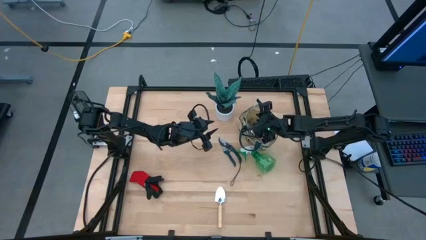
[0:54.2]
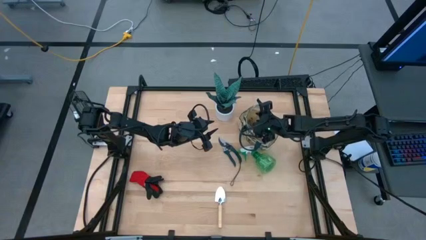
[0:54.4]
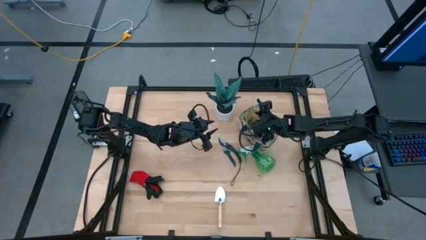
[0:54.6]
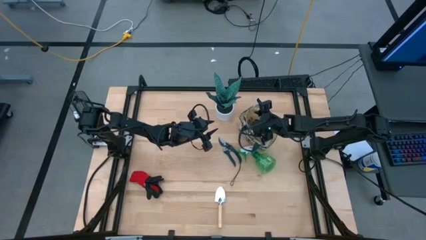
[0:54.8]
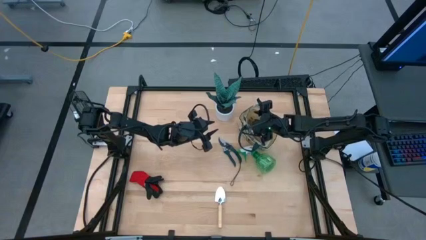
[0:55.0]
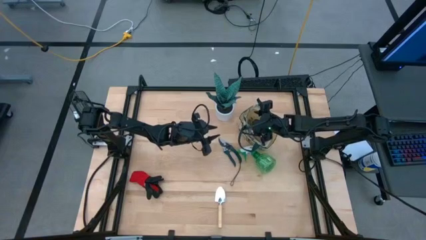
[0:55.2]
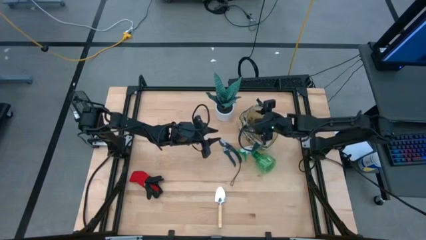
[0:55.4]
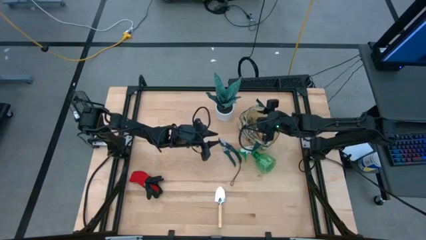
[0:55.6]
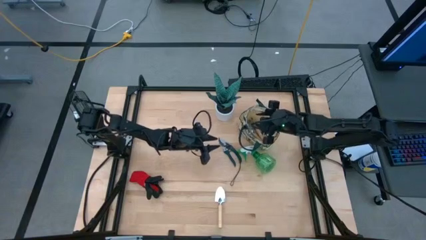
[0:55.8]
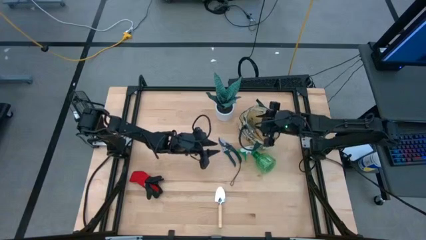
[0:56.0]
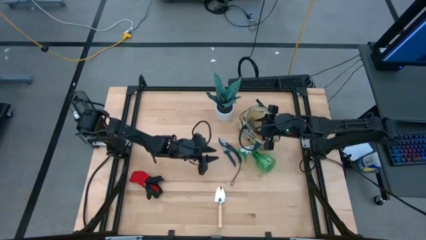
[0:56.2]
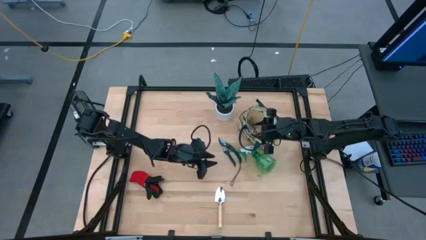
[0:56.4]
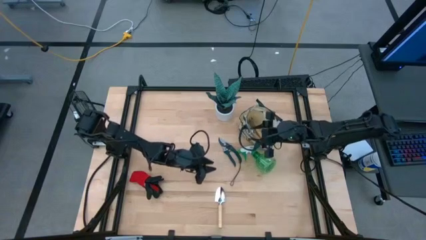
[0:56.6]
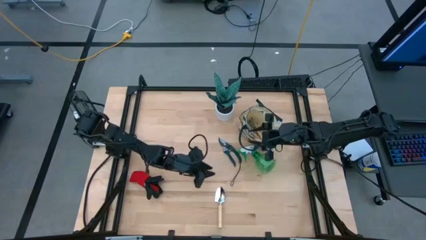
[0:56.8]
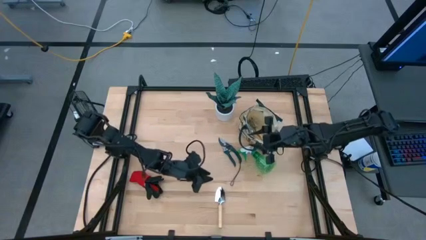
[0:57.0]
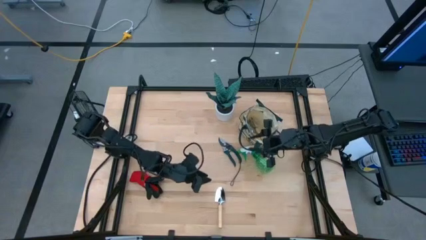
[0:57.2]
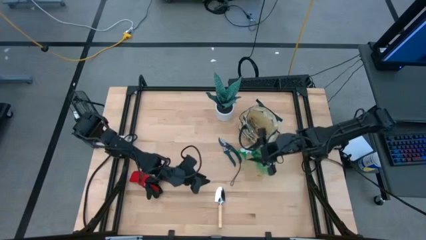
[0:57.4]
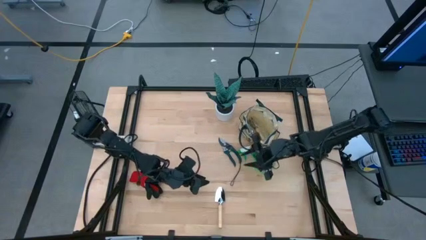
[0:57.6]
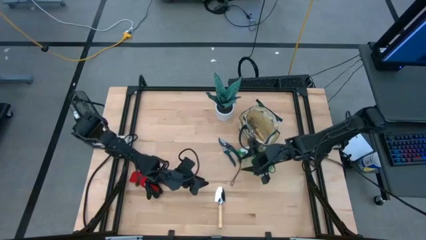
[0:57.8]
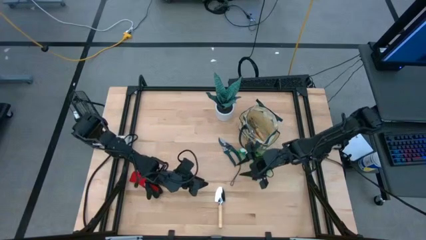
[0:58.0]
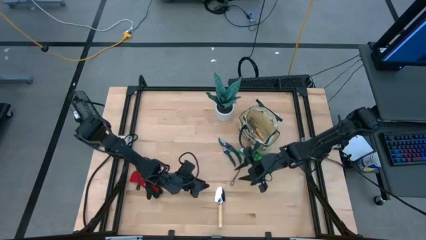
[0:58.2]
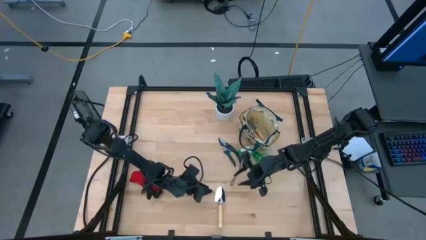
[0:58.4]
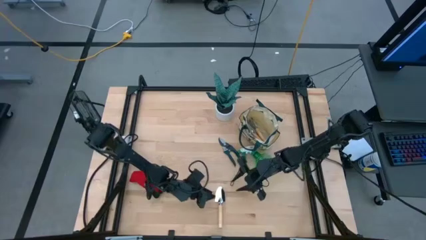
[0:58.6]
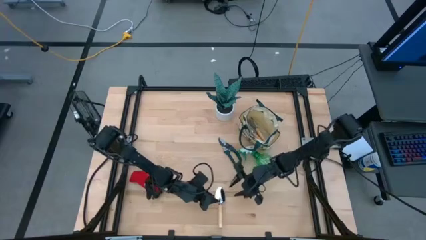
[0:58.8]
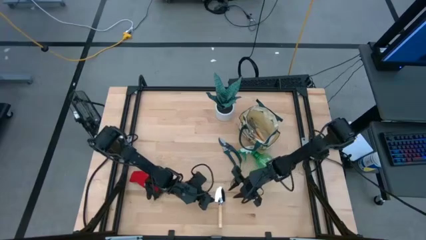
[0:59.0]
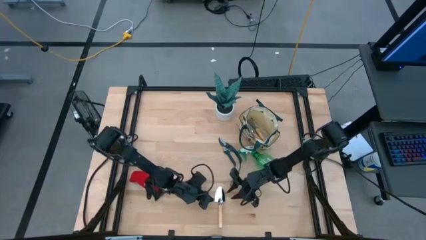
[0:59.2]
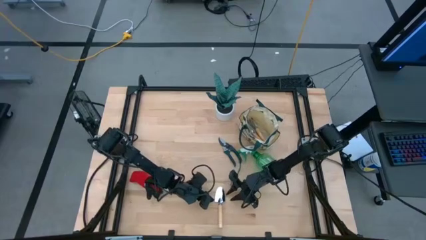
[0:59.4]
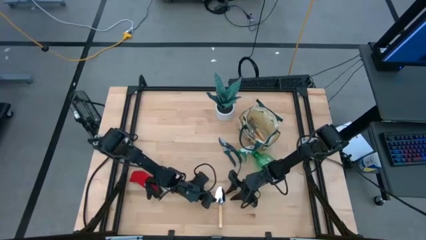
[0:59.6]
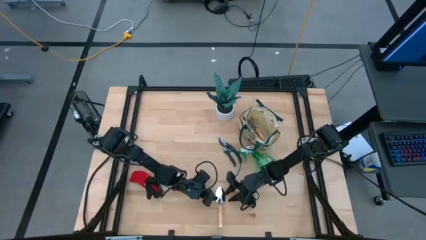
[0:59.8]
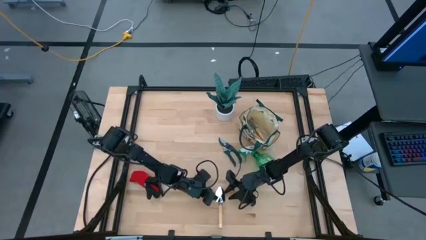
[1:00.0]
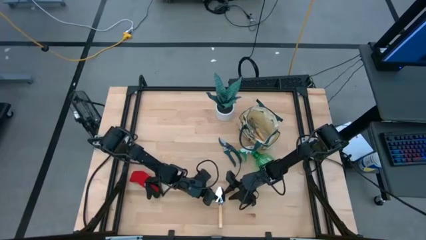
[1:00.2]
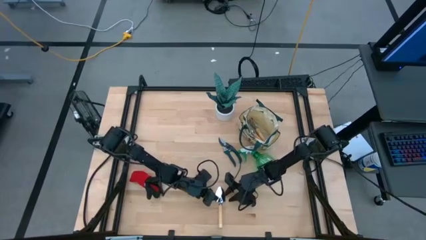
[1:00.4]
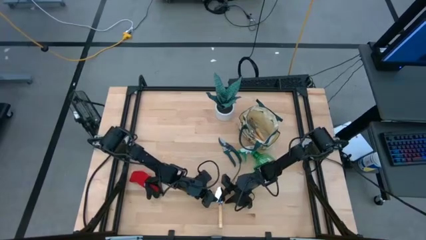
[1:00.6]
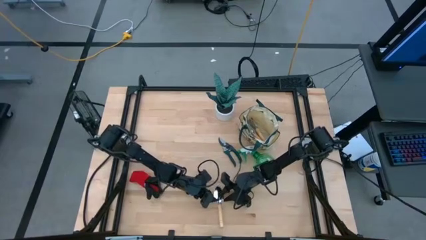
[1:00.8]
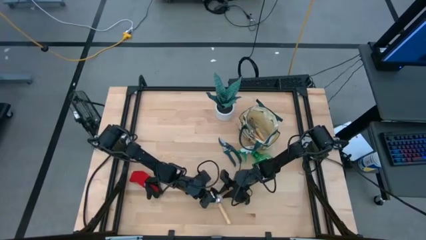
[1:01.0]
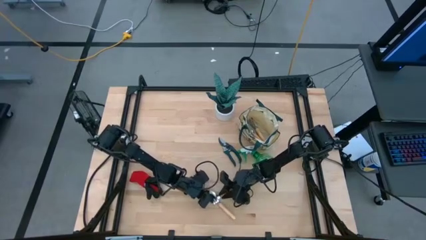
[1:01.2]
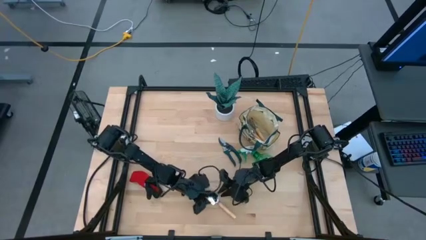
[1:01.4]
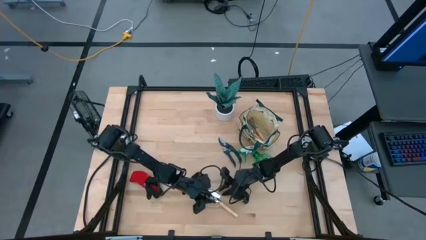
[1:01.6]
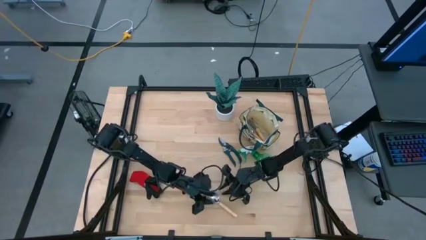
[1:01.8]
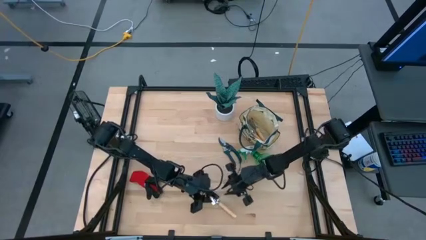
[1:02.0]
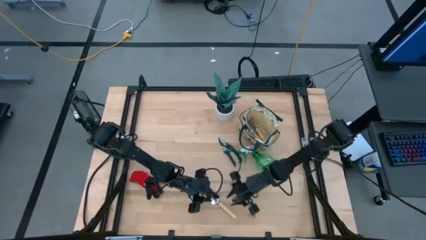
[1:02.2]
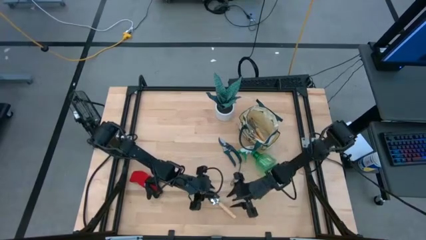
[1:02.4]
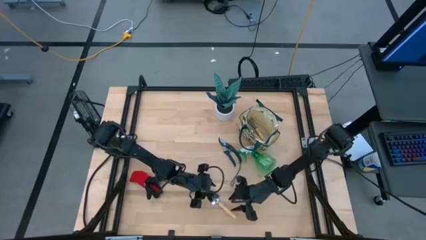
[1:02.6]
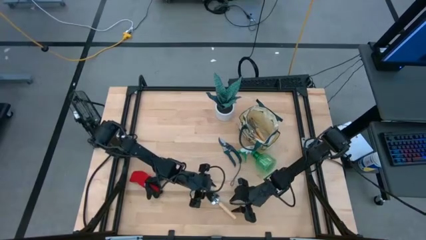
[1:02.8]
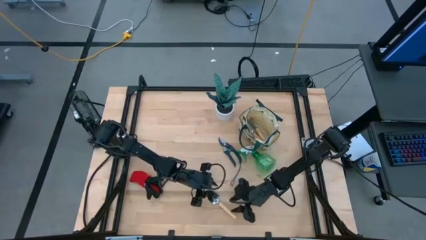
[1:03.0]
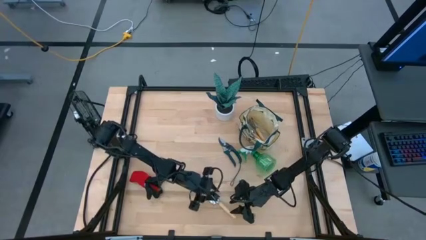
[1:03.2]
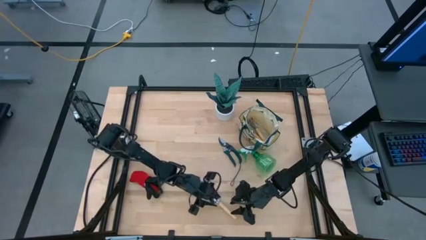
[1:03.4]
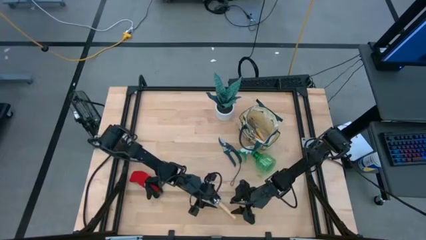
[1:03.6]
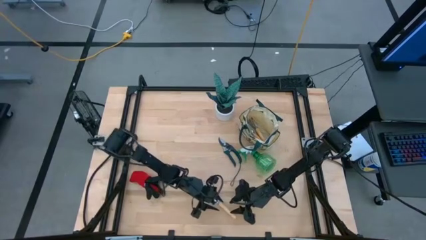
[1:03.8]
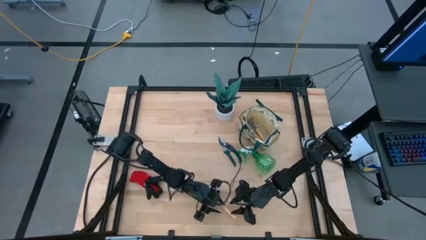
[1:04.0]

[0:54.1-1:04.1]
Task: Pick & Place Garden tools in Gardening bag
Put the brown trowel into the gardening bag
